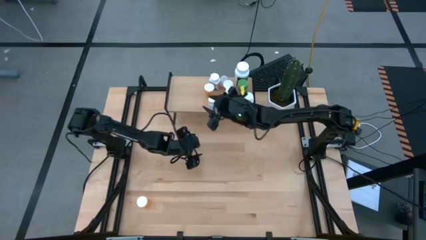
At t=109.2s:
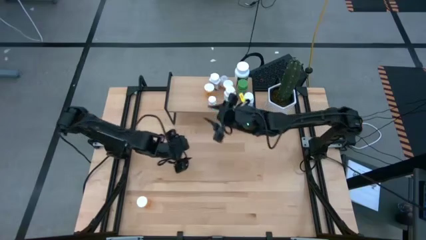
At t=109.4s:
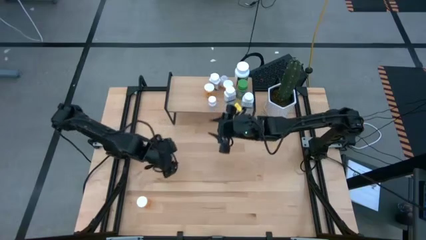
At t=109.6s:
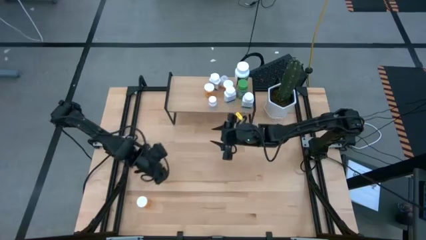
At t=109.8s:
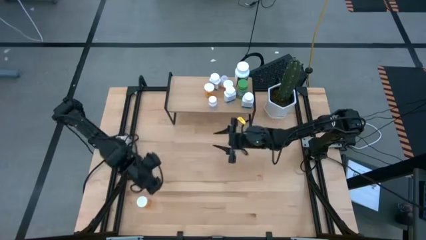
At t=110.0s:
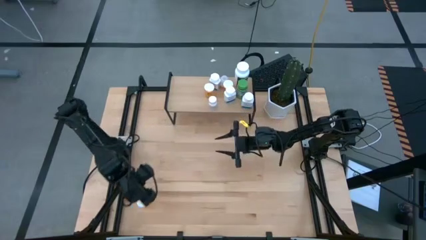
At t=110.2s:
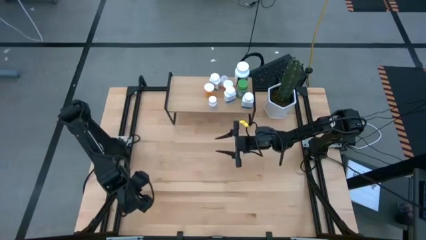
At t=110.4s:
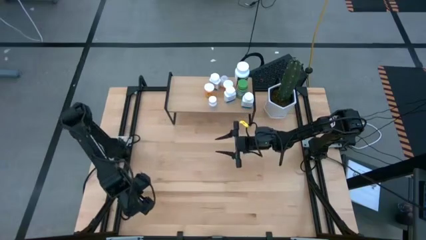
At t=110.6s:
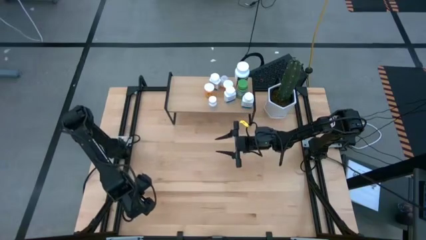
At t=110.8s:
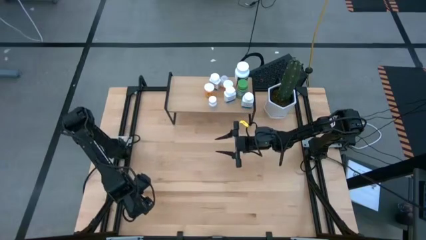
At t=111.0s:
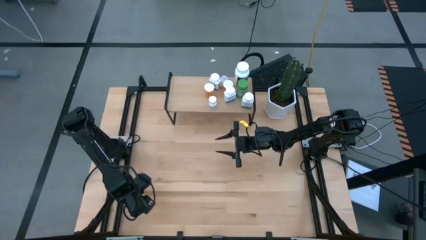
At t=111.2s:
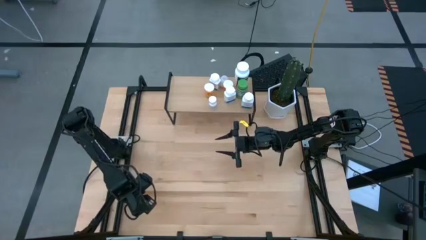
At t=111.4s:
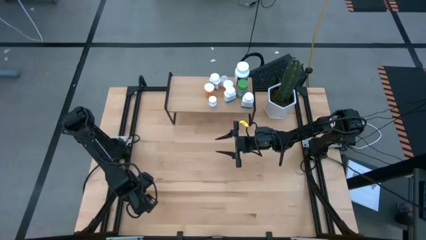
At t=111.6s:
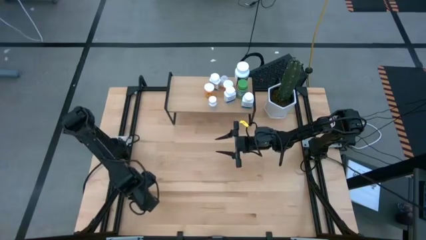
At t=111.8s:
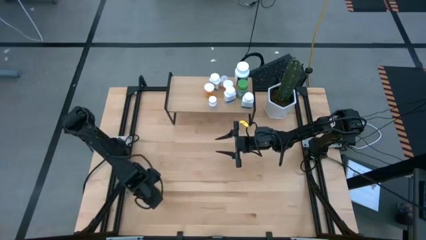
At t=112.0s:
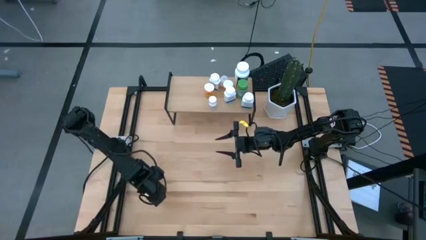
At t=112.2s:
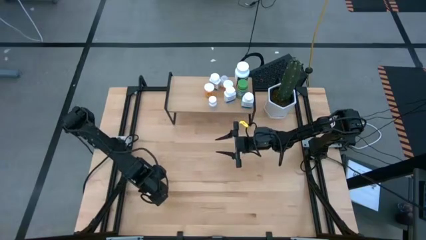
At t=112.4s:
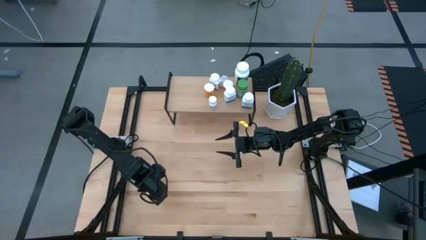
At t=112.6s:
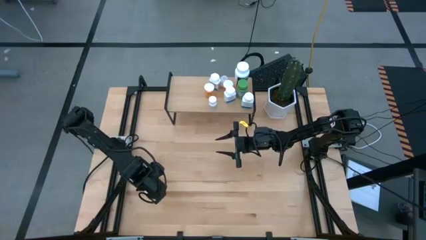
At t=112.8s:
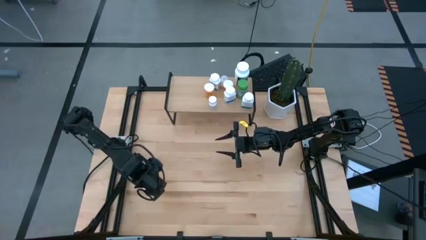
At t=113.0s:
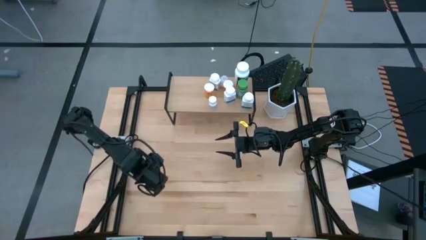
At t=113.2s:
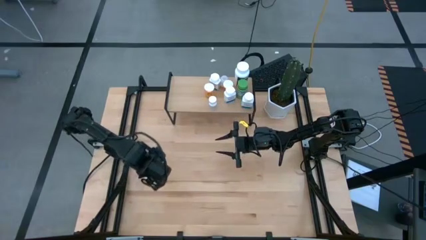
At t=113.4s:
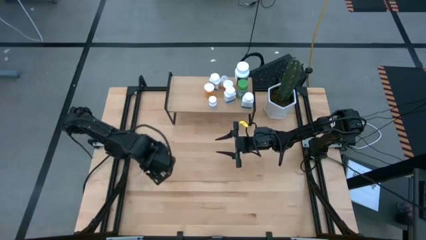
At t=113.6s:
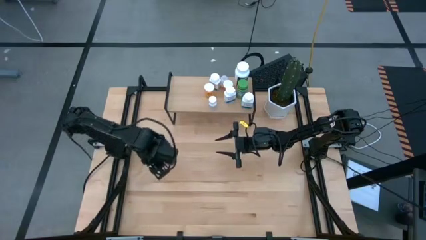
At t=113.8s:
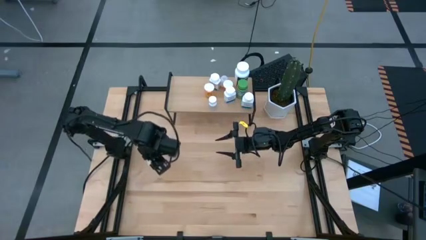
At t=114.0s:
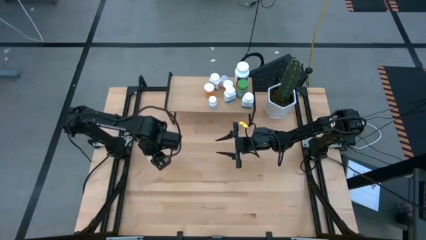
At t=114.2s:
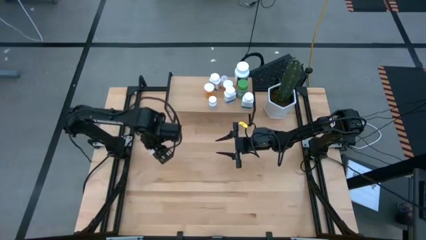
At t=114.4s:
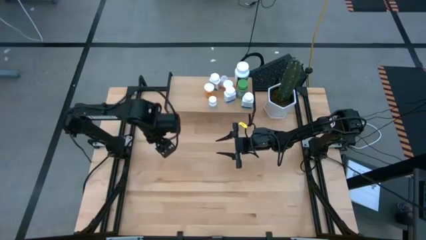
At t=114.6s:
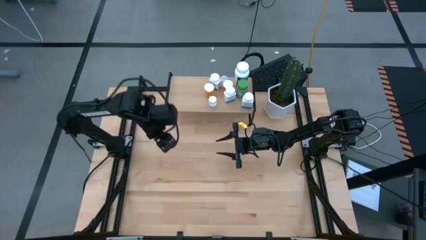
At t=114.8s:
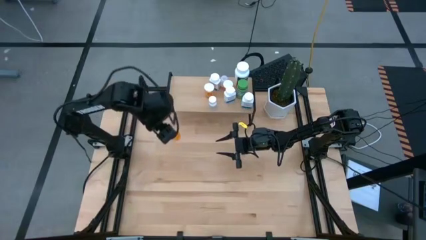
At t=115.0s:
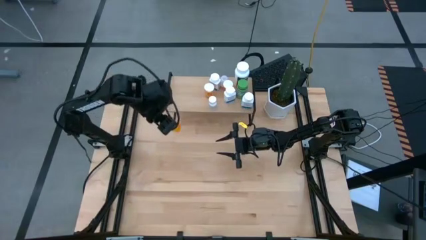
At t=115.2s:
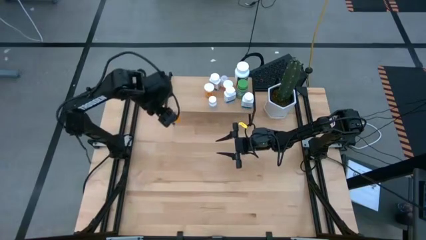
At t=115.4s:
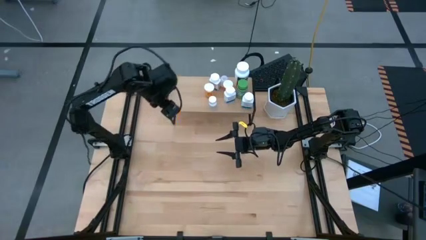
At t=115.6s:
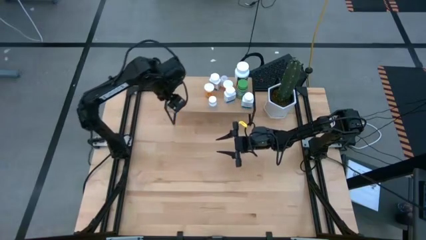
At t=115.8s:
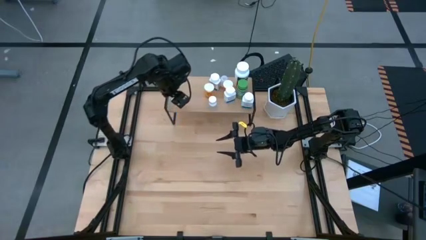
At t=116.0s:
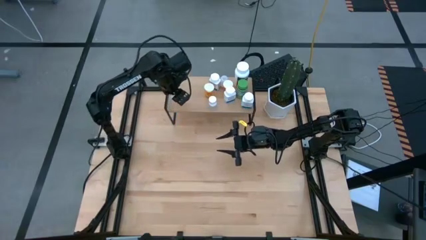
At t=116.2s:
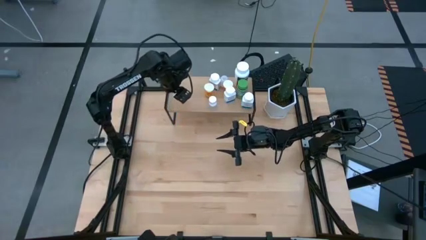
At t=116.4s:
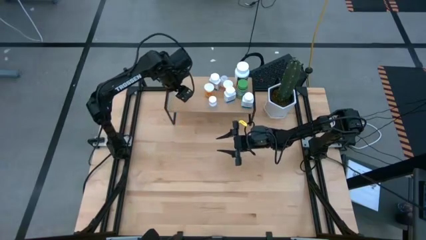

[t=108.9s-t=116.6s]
Task: Pick and place medicine bottles onto shelf by color
Put the orange pill bottle on the shelf

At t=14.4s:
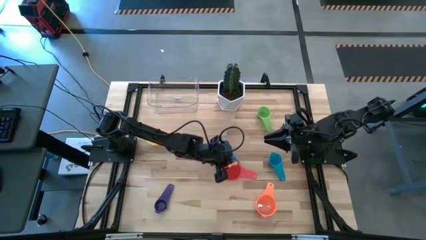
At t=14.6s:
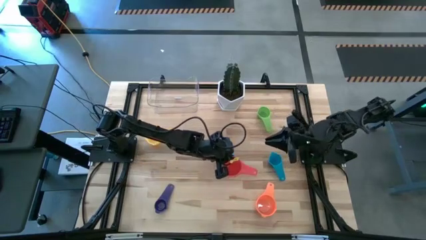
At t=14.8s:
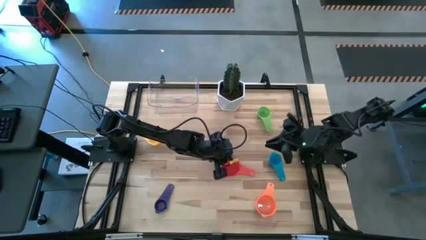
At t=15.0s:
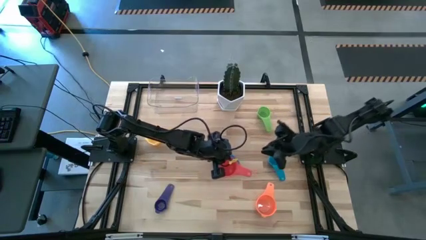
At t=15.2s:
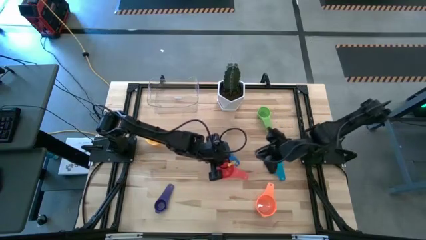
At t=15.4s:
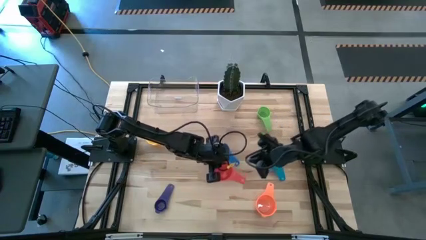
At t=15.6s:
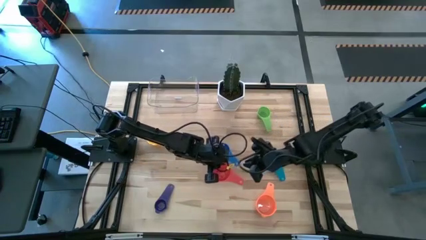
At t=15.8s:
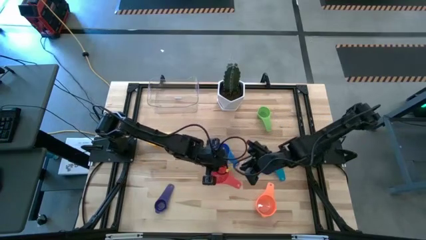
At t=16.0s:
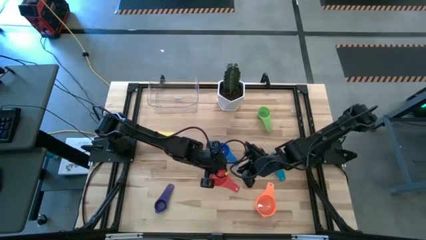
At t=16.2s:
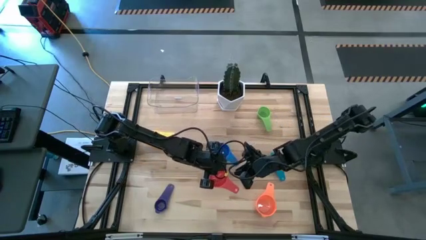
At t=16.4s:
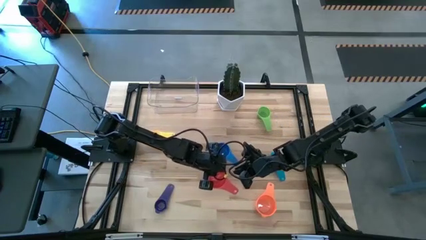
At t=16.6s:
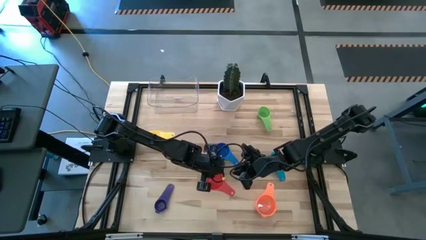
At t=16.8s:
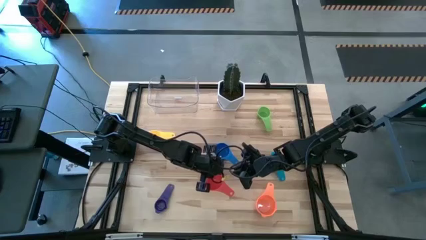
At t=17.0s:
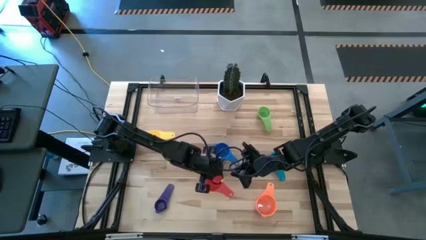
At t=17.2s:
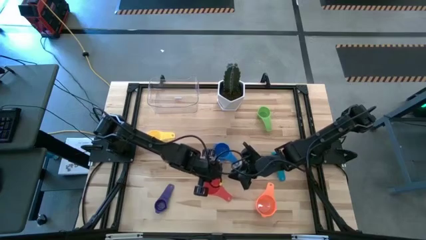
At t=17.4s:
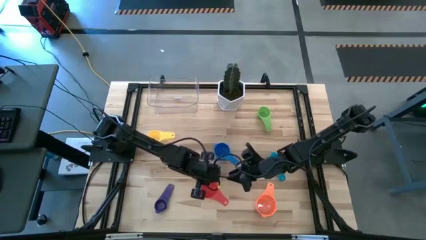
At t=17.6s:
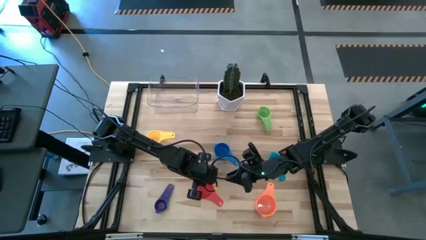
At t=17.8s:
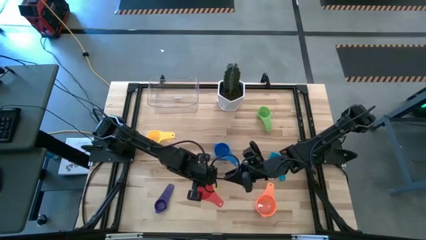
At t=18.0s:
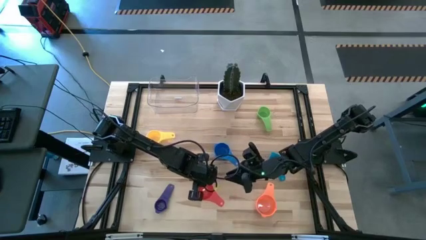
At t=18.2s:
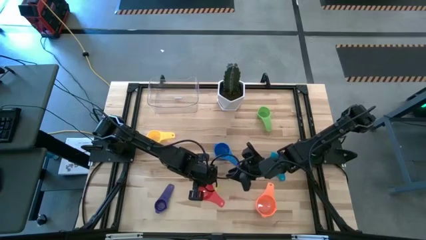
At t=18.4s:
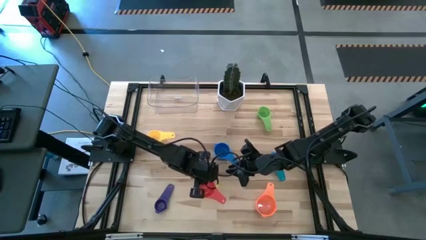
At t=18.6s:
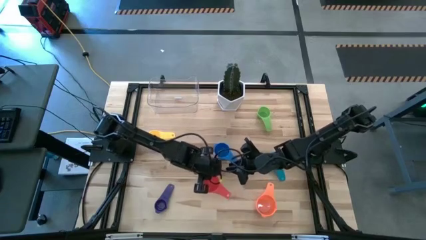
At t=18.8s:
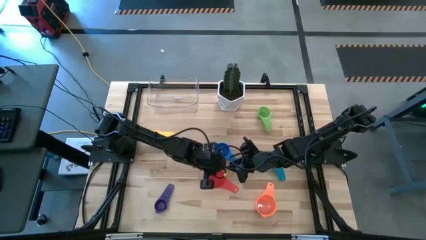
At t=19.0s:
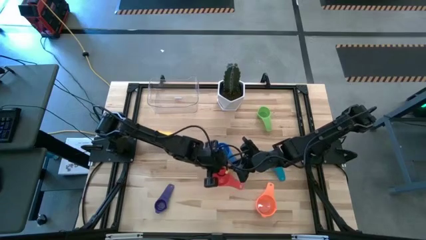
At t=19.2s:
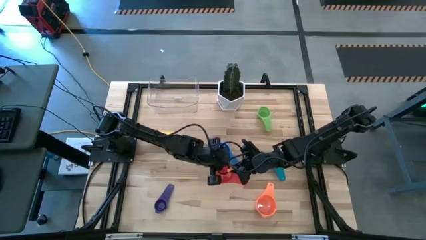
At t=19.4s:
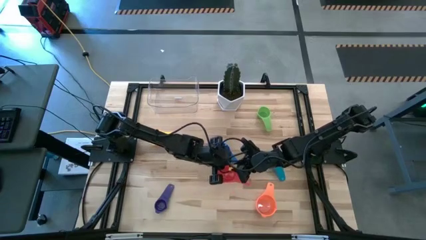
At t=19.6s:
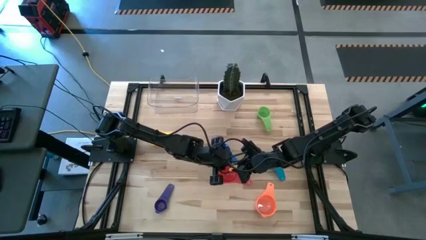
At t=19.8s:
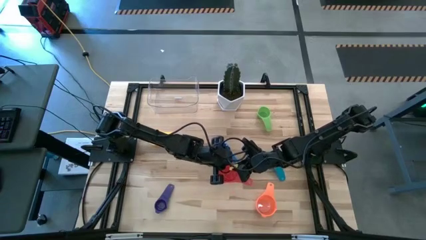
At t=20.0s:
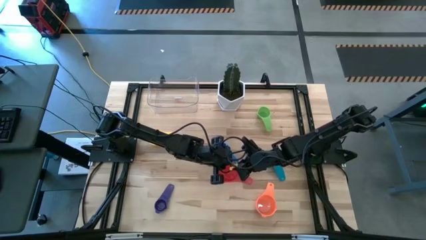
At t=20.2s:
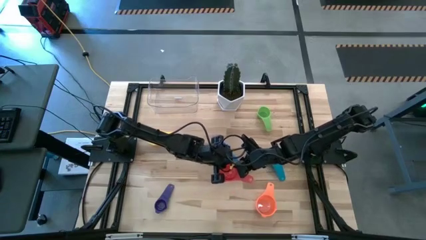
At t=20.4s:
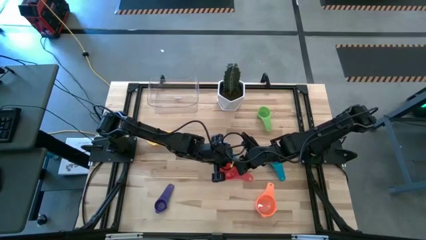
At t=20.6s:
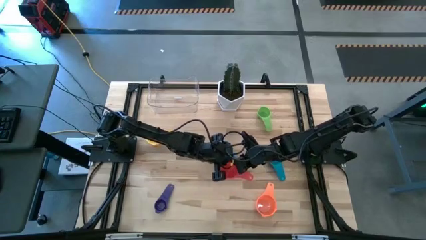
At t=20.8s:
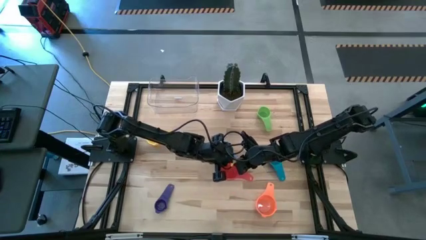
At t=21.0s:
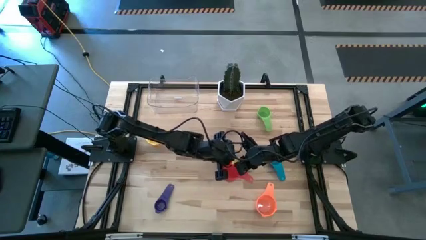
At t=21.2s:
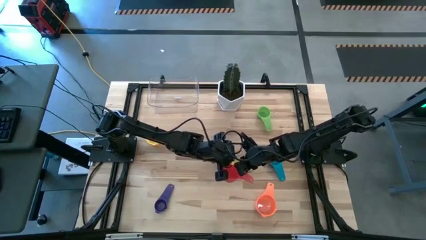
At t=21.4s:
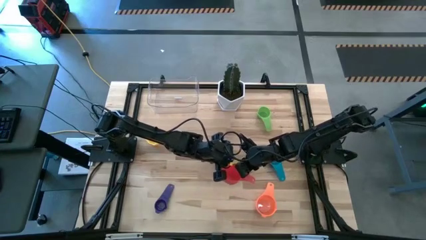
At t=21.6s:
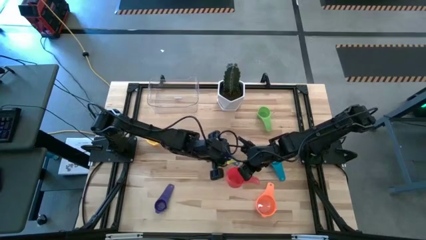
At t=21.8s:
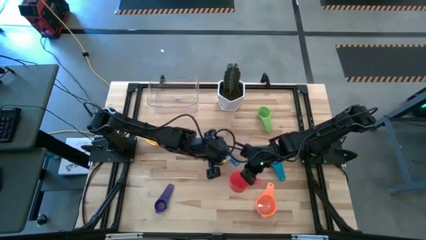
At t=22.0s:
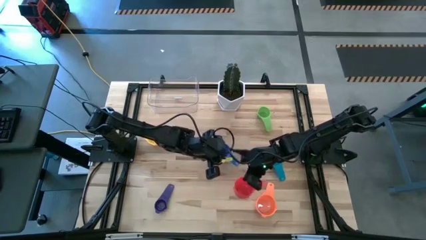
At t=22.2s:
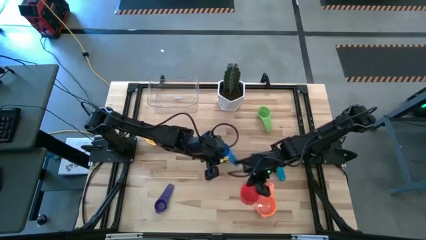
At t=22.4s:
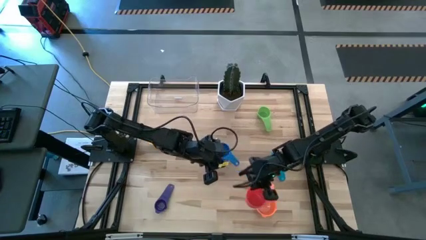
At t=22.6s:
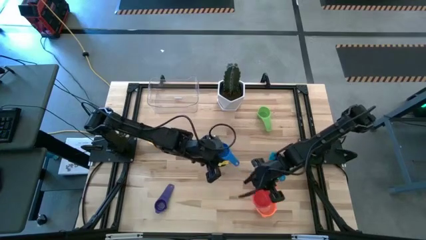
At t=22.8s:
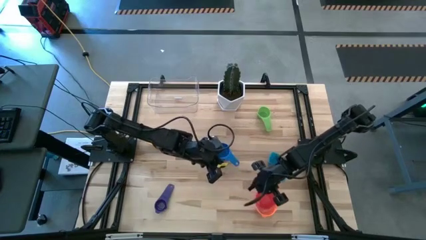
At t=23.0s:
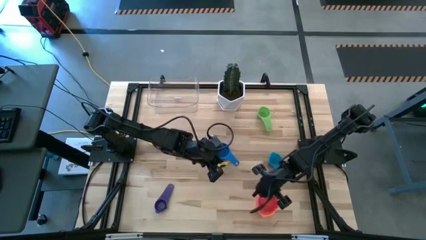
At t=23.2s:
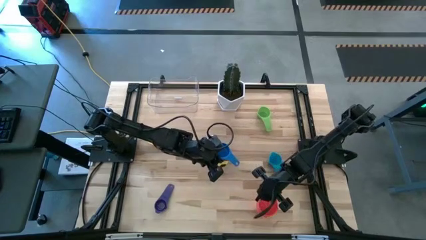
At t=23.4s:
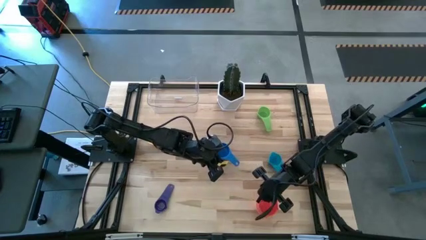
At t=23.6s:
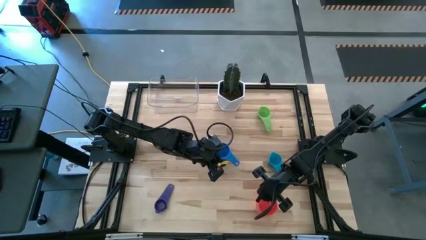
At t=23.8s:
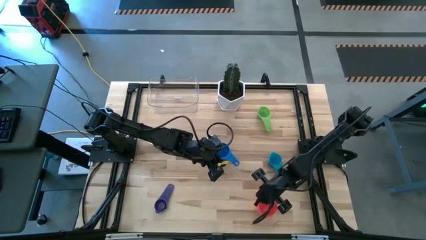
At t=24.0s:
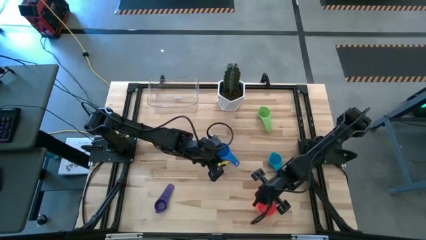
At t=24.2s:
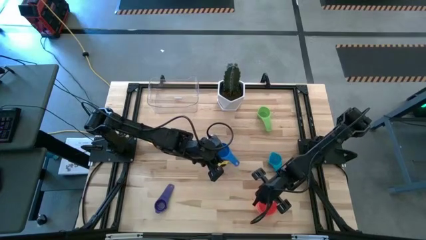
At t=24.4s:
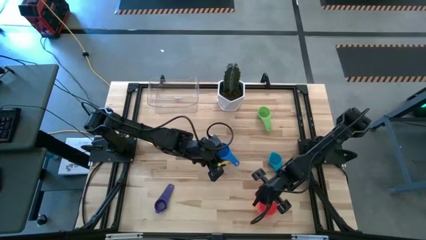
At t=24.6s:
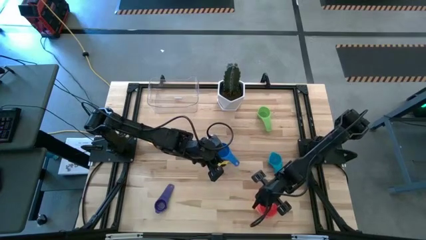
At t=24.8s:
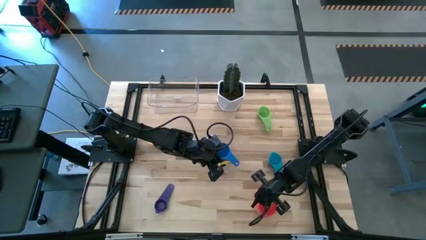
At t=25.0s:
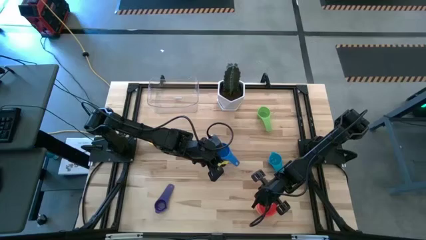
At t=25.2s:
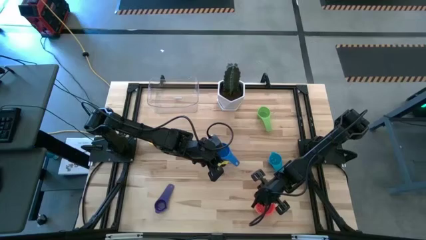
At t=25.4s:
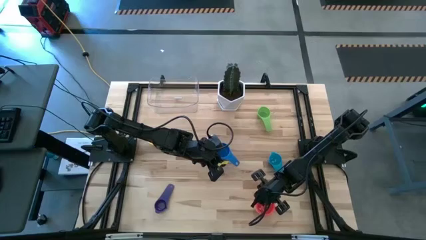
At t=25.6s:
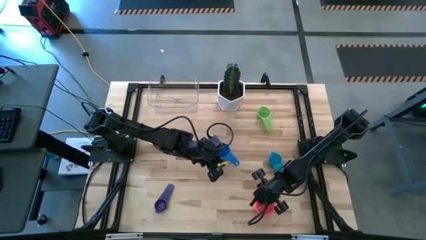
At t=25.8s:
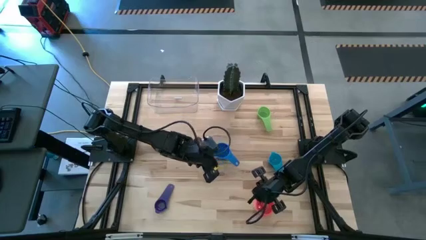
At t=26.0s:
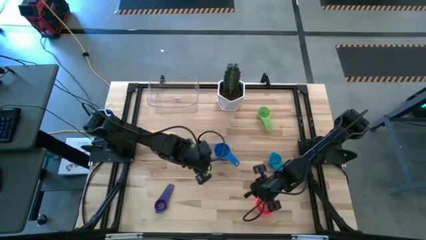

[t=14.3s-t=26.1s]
Task: Nest measuring cups in basket
Stack the red measuring cup on top of the orange measuring cup
